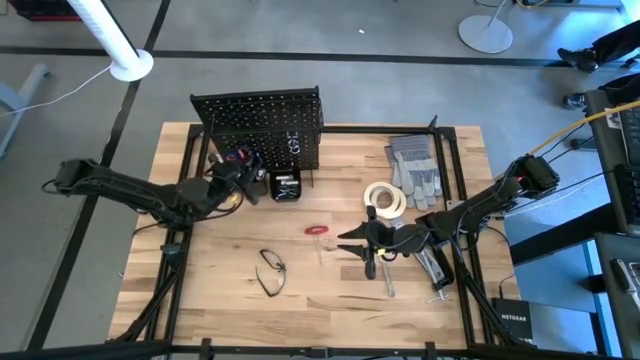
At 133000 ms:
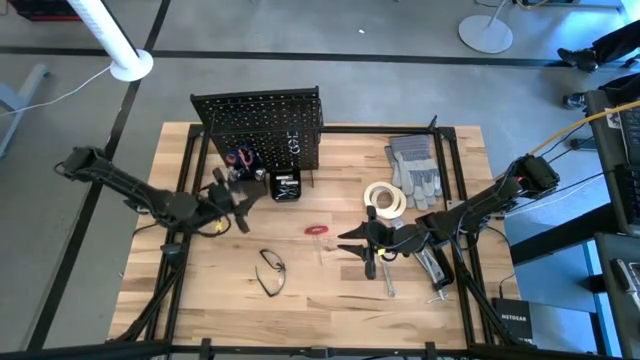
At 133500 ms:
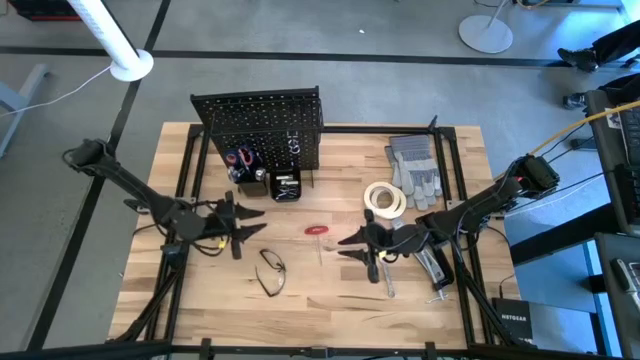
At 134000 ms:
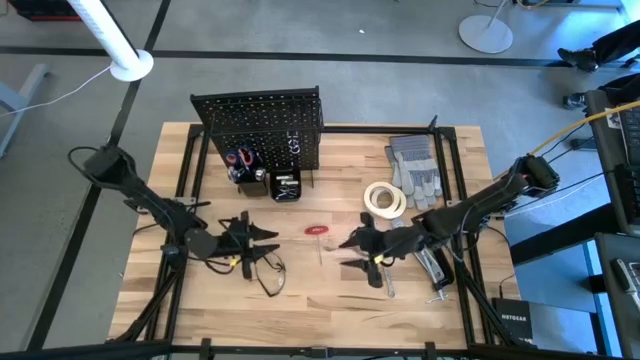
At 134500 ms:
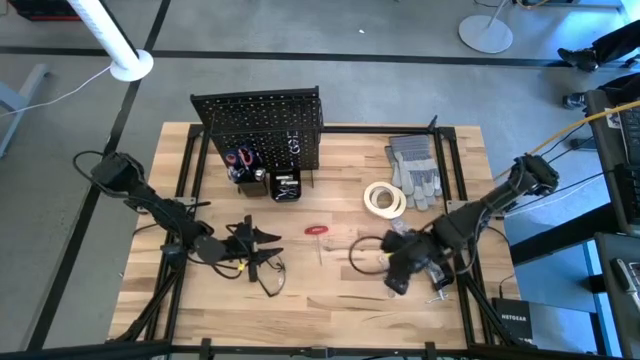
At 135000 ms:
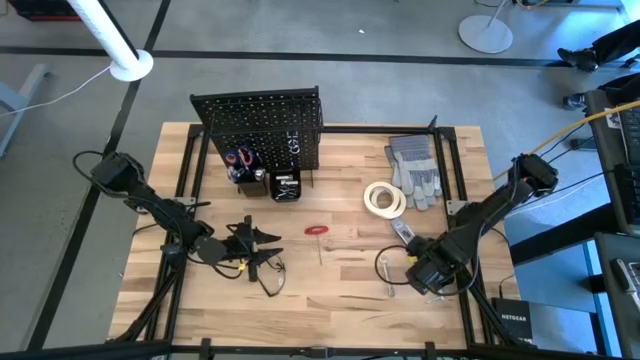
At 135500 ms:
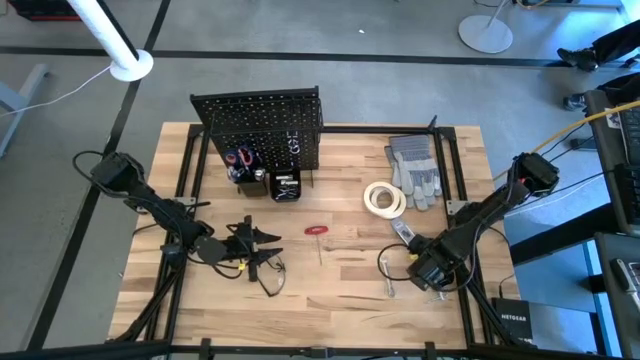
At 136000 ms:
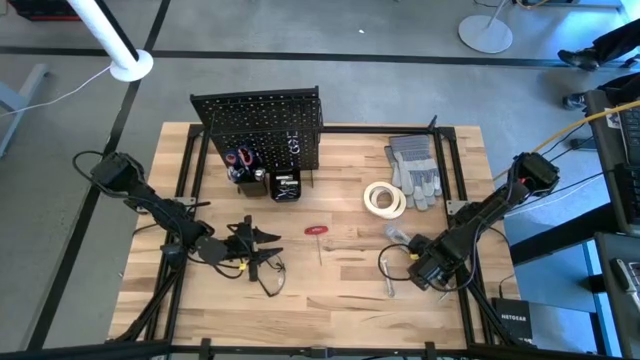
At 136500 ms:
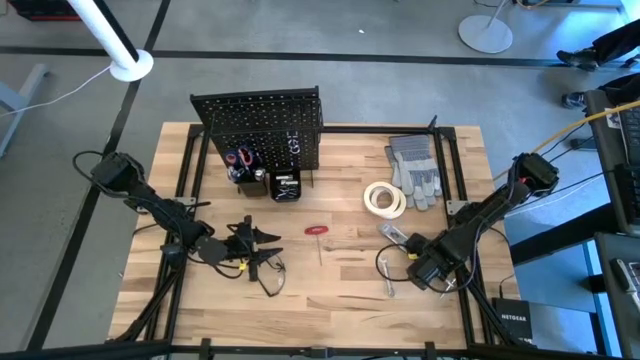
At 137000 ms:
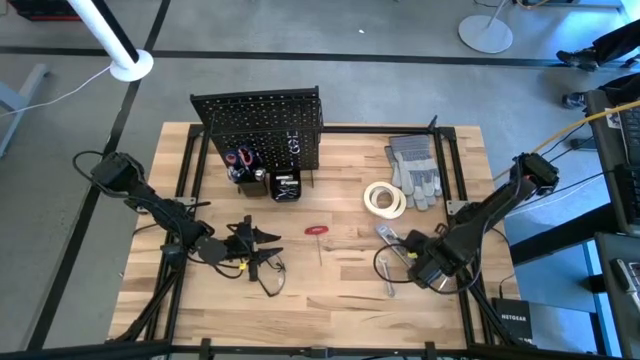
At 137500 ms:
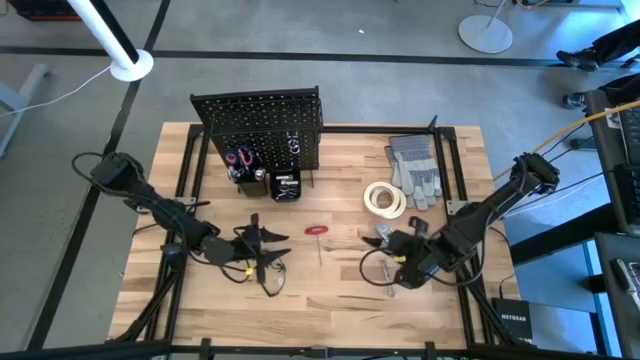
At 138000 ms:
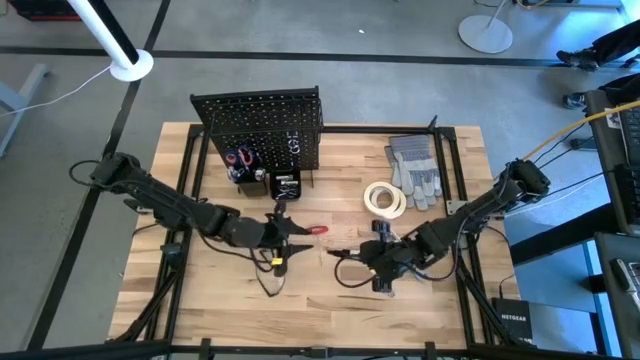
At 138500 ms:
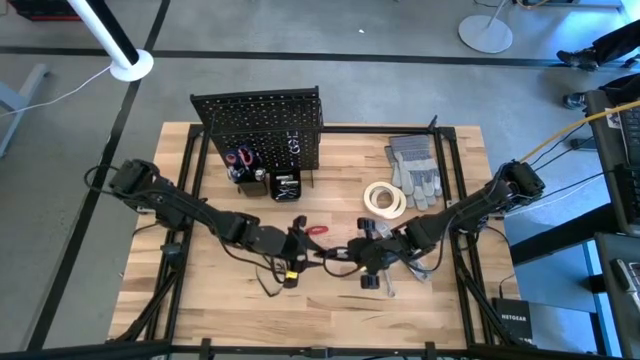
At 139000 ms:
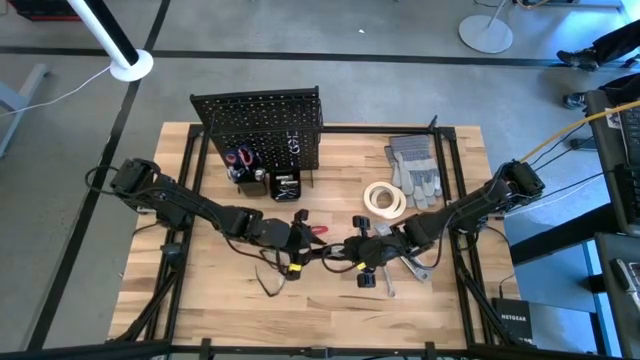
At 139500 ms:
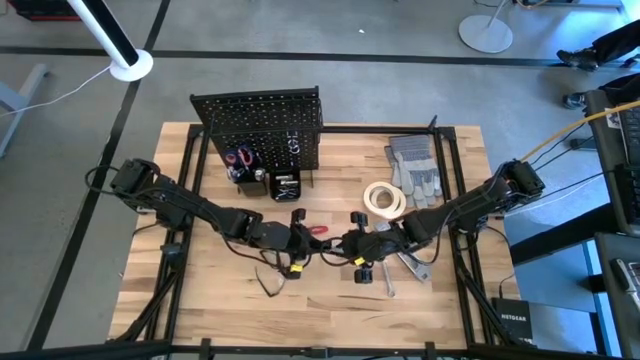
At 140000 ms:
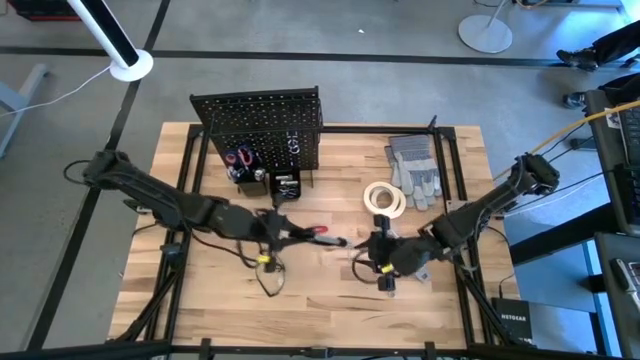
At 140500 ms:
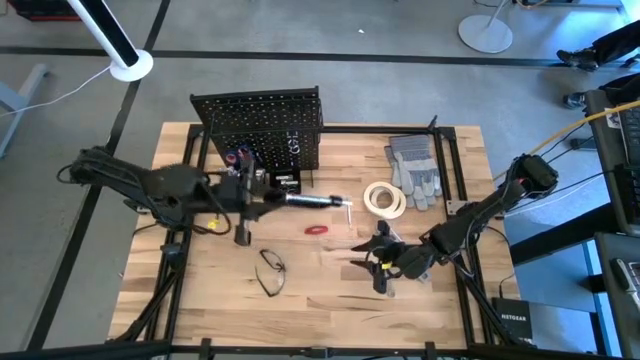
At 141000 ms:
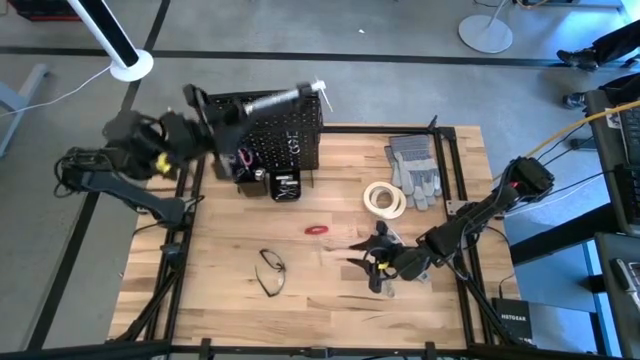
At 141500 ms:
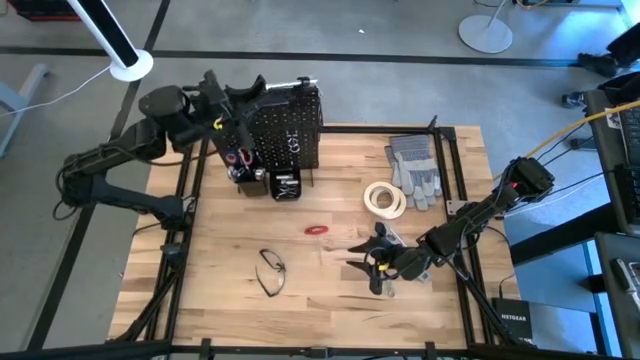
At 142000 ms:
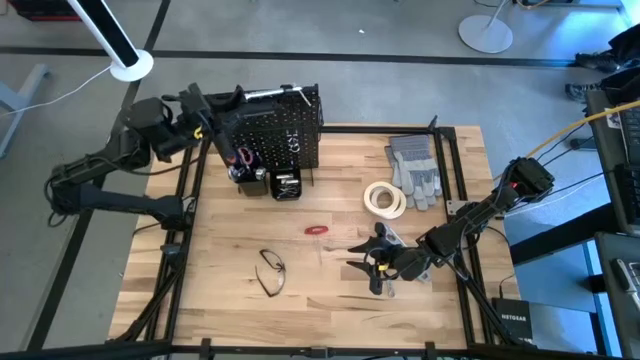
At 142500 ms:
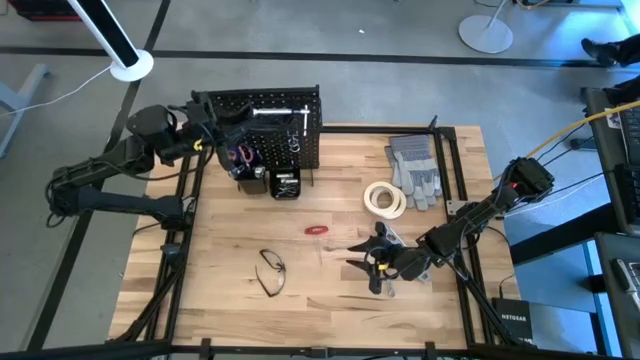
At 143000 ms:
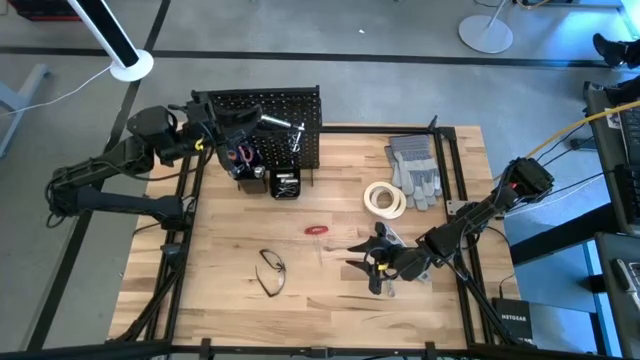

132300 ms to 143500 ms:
Task: Hang tools onto peg board
Put the C-clamp on the peg board

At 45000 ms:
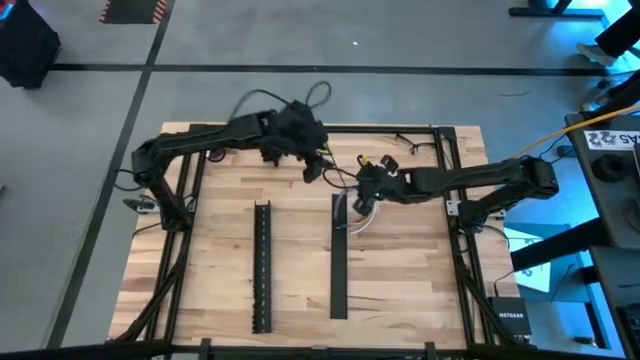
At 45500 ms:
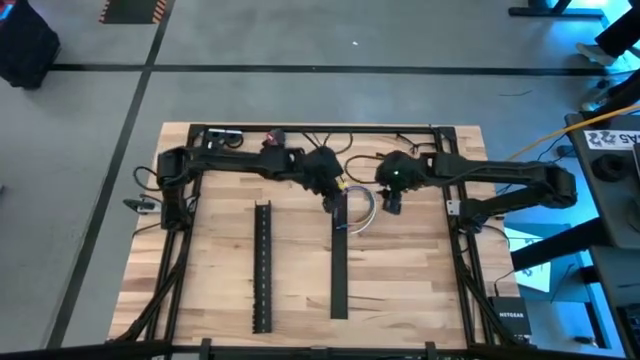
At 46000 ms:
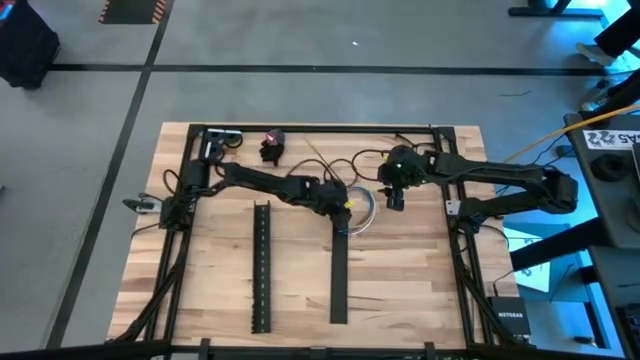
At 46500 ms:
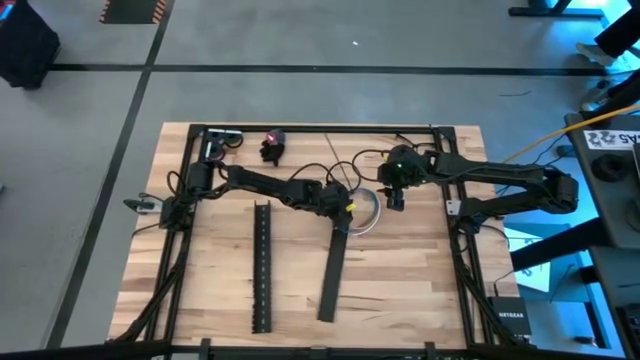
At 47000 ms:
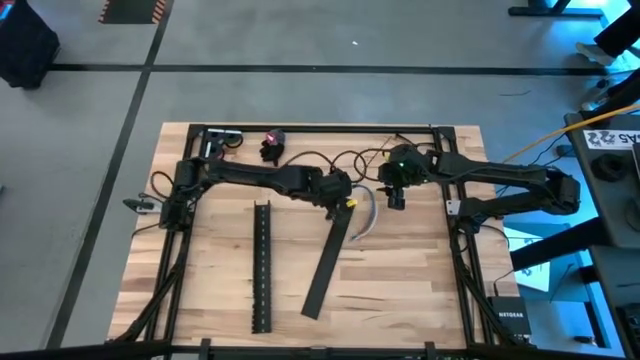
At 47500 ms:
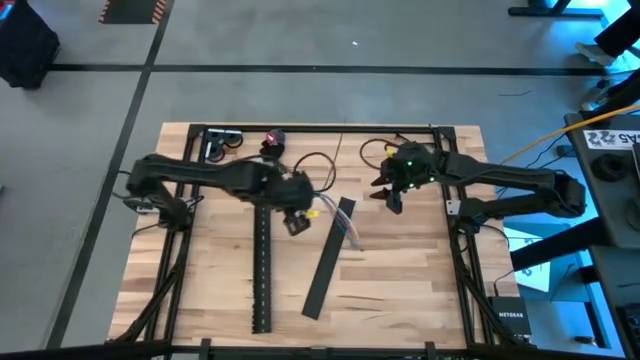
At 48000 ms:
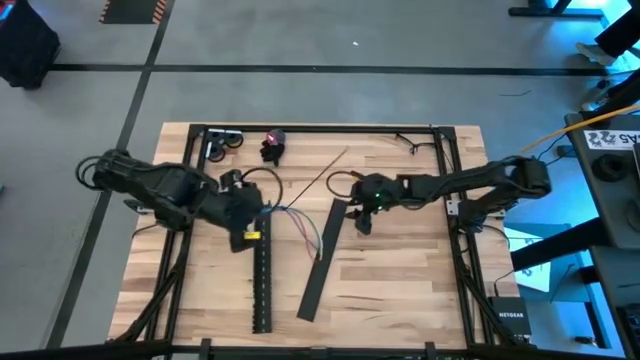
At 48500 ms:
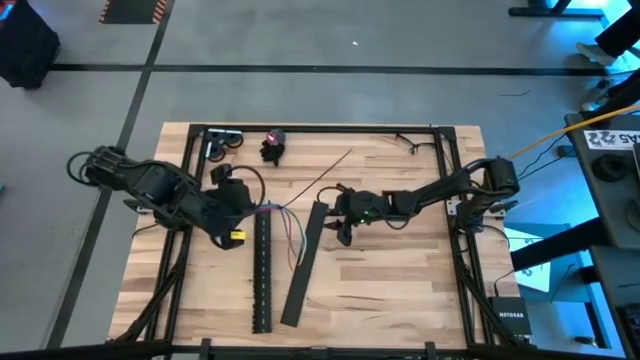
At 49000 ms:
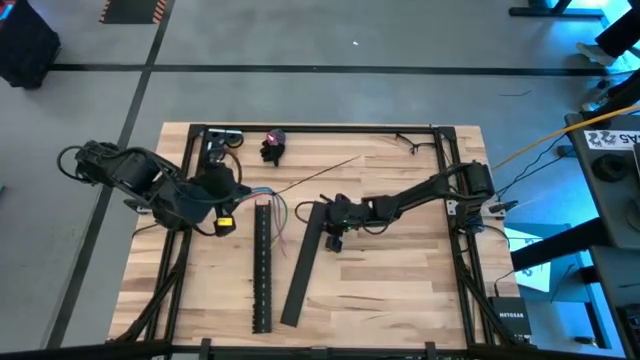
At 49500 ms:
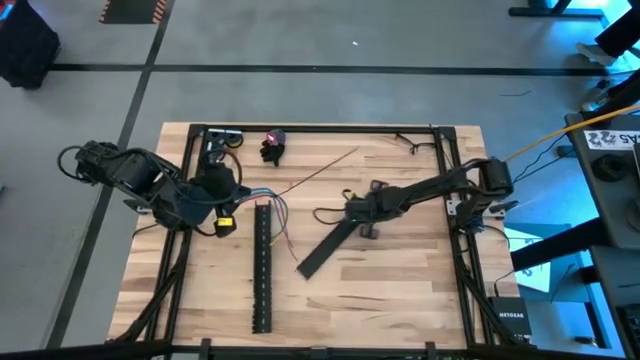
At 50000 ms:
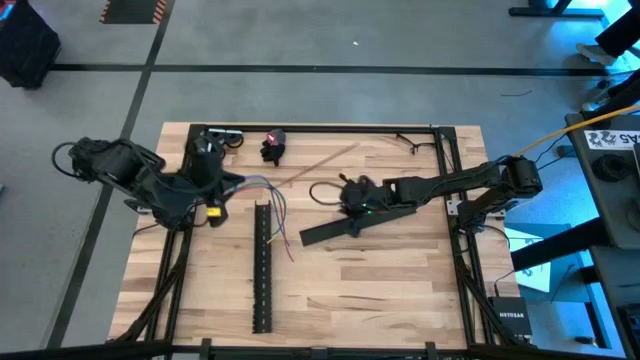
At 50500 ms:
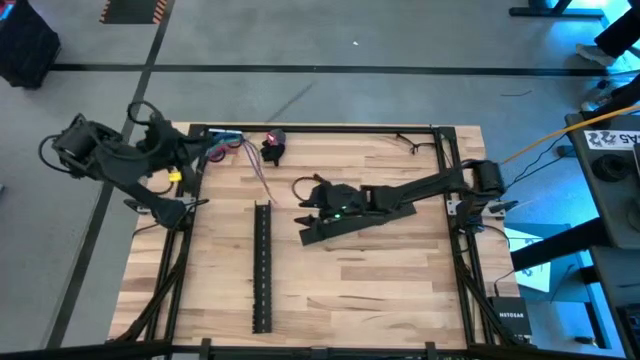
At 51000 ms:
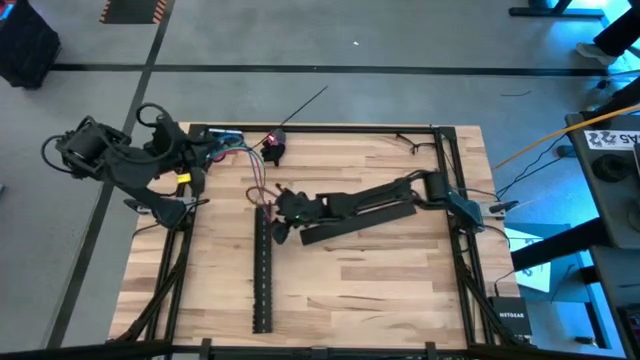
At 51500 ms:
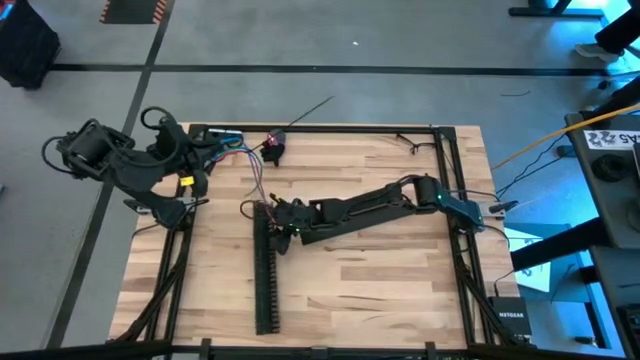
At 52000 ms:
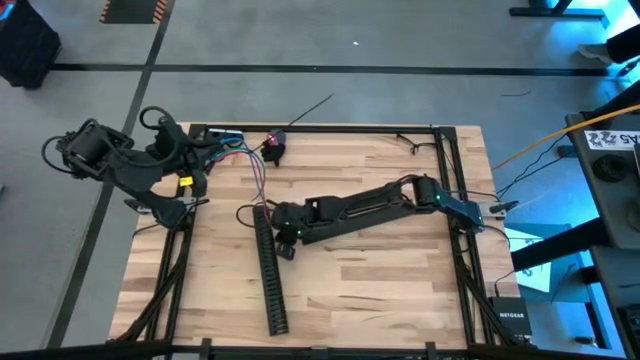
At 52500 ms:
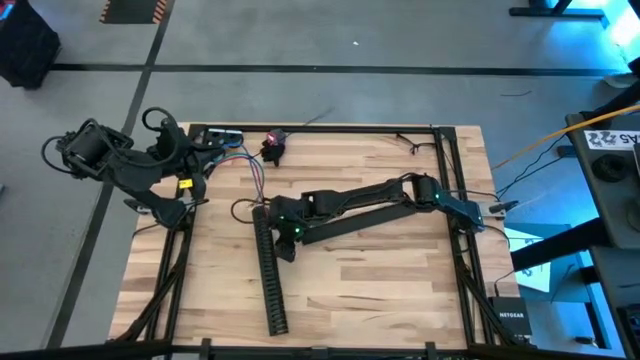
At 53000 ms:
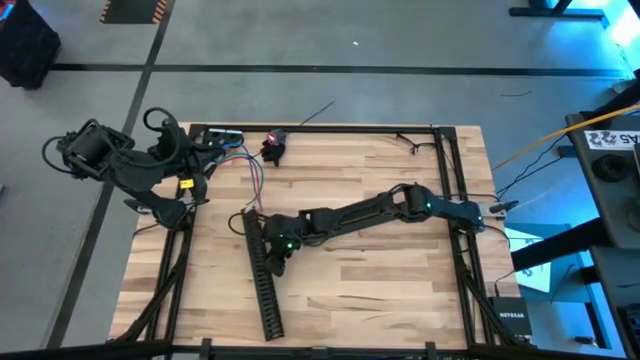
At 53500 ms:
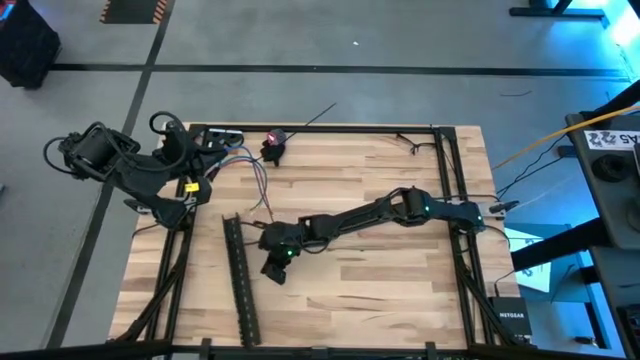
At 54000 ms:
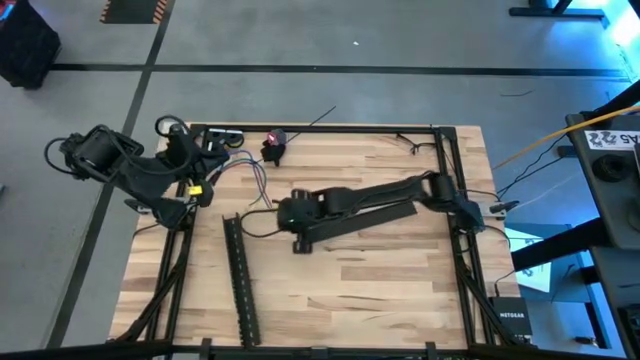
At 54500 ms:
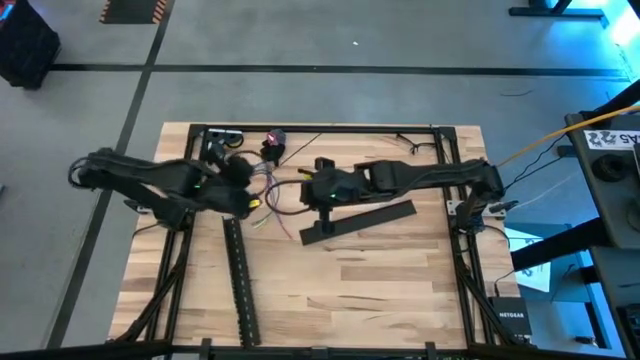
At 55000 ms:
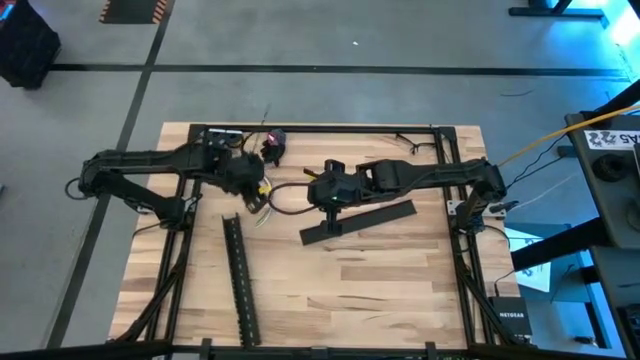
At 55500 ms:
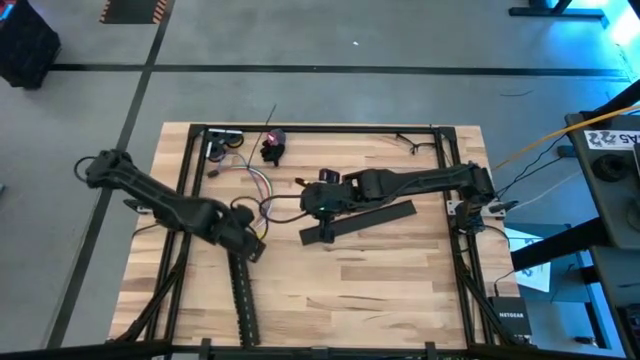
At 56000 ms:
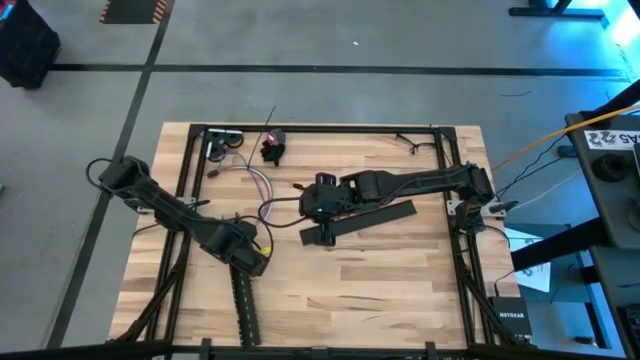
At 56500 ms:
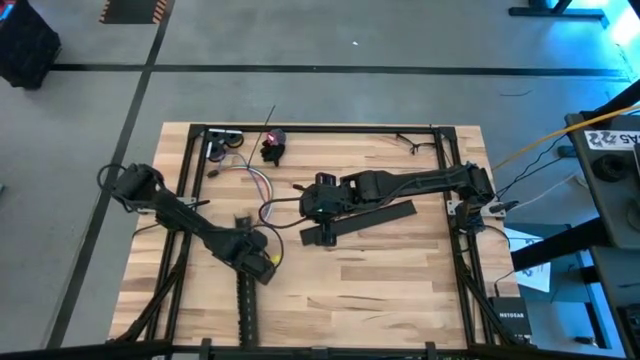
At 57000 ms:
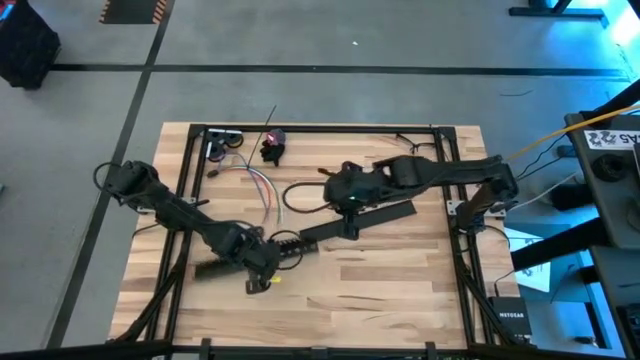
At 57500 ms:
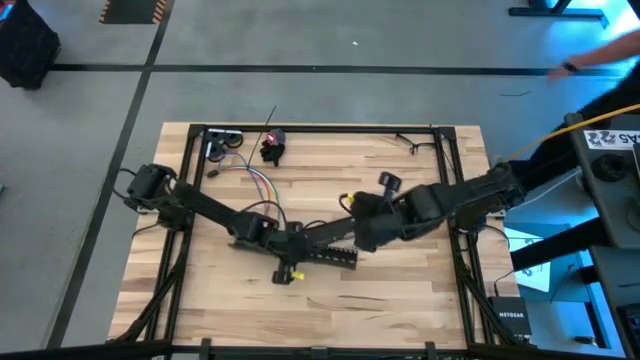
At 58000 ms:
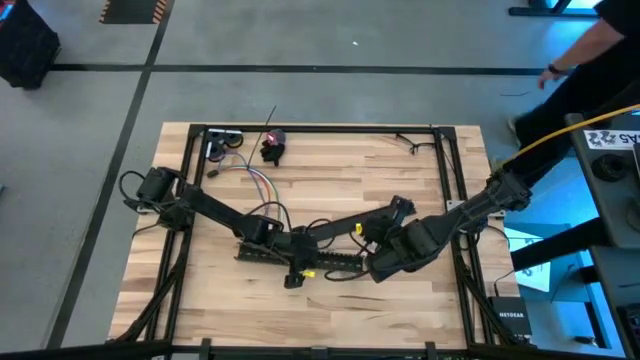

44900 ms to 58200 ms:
Task: Ziptie cables
Adjust the black cable duct
